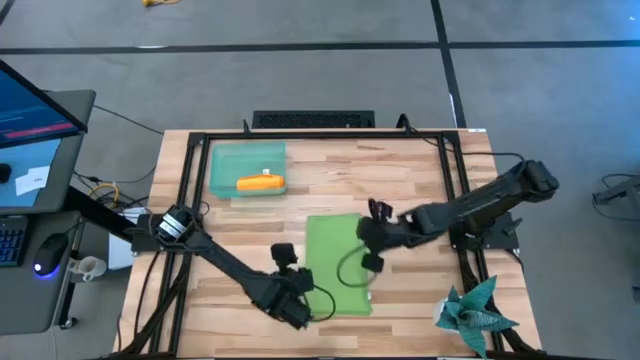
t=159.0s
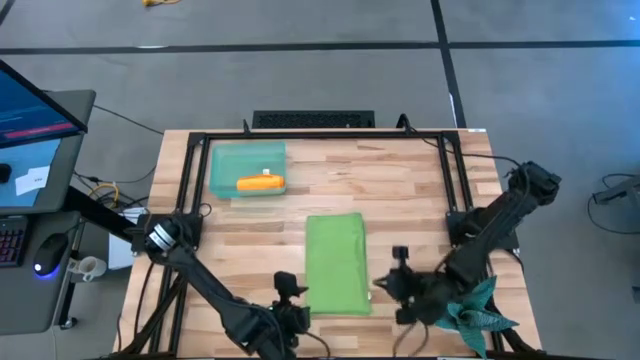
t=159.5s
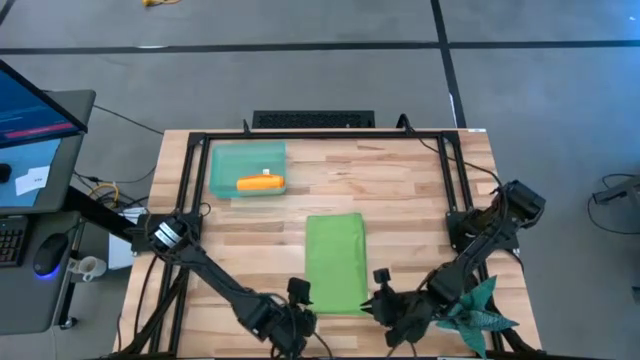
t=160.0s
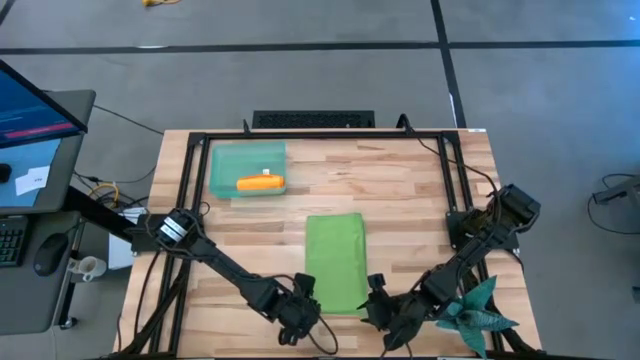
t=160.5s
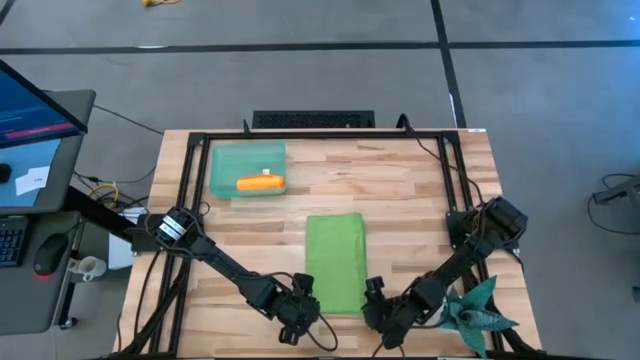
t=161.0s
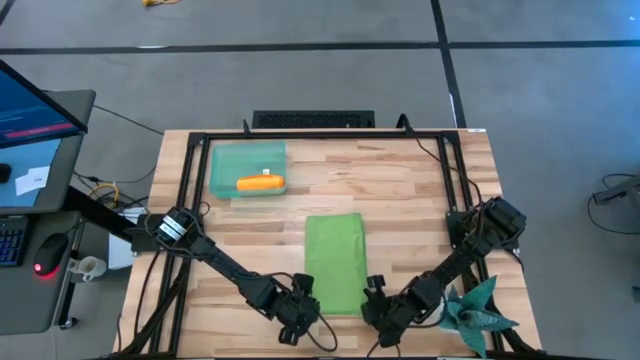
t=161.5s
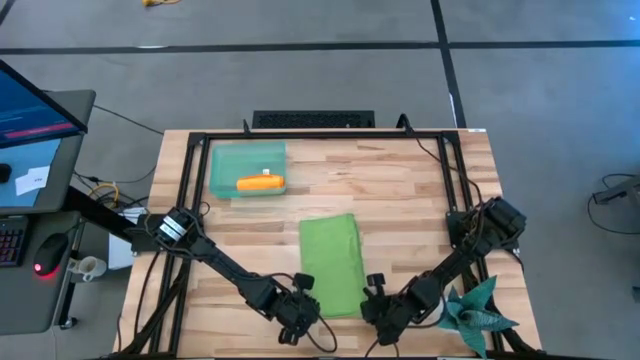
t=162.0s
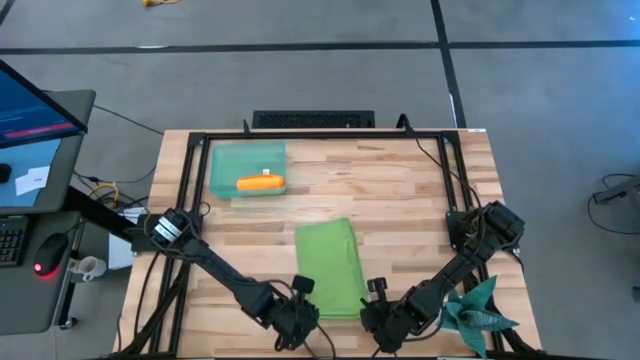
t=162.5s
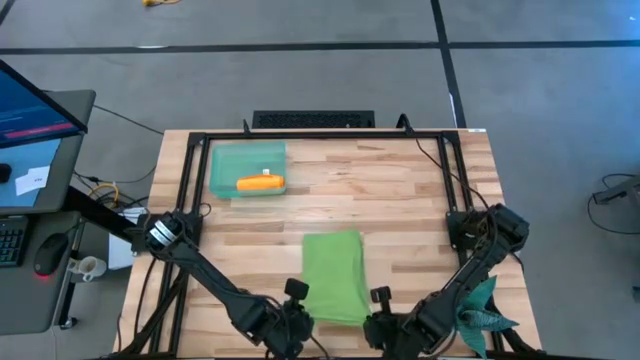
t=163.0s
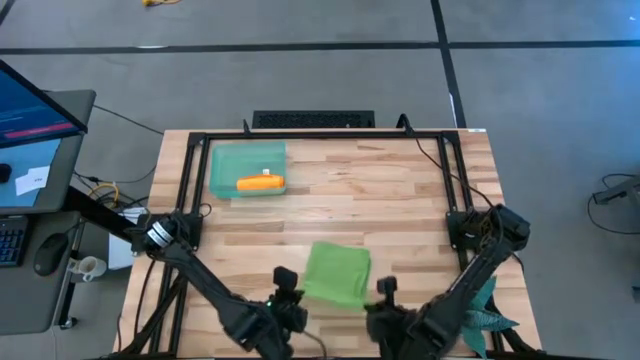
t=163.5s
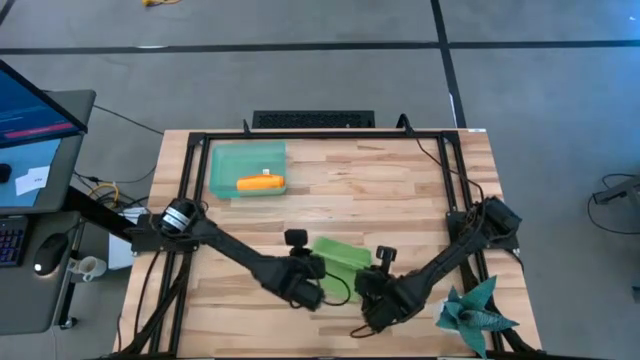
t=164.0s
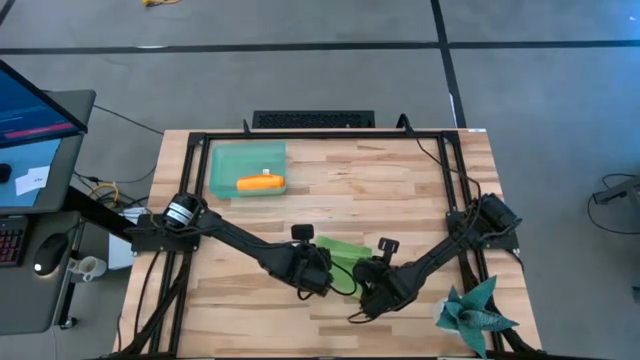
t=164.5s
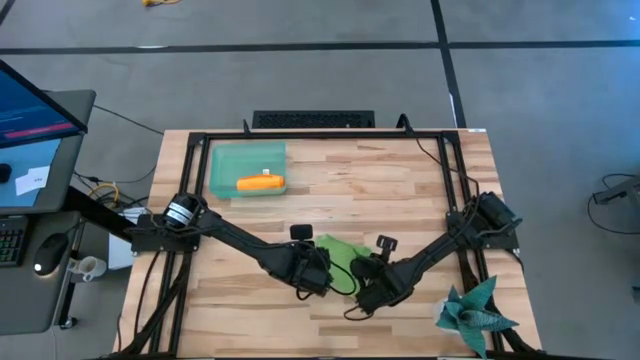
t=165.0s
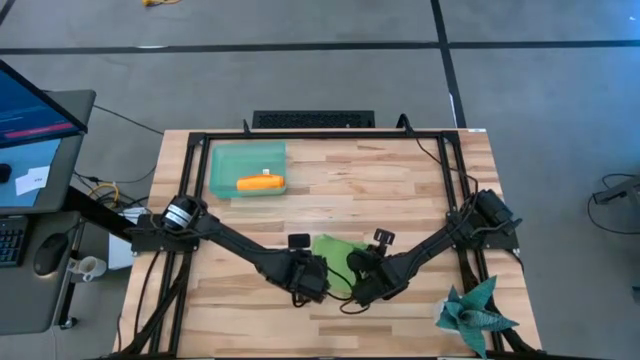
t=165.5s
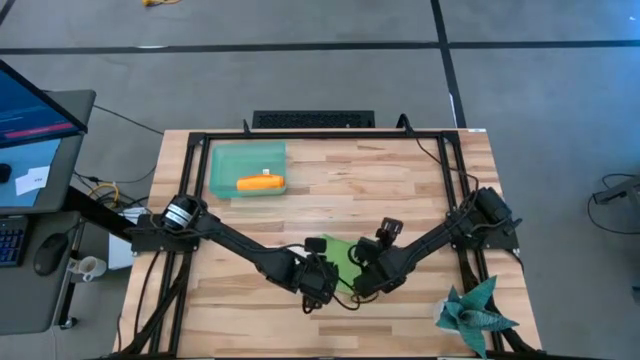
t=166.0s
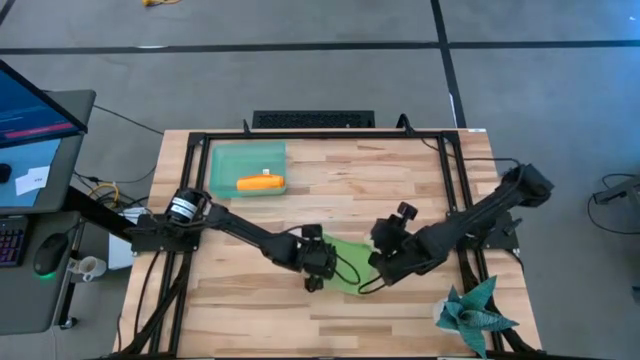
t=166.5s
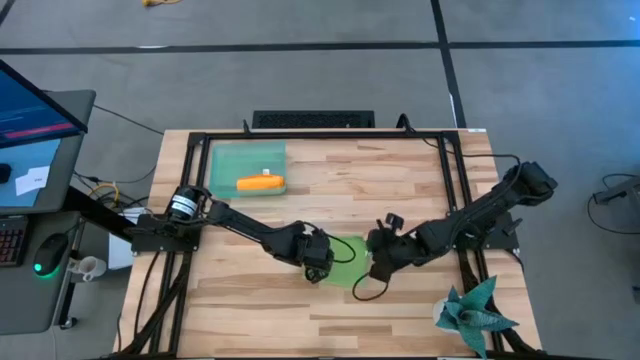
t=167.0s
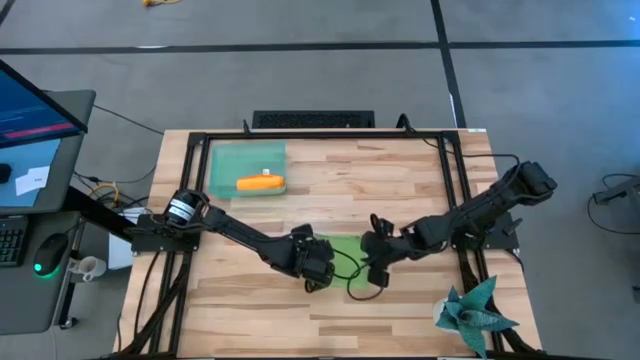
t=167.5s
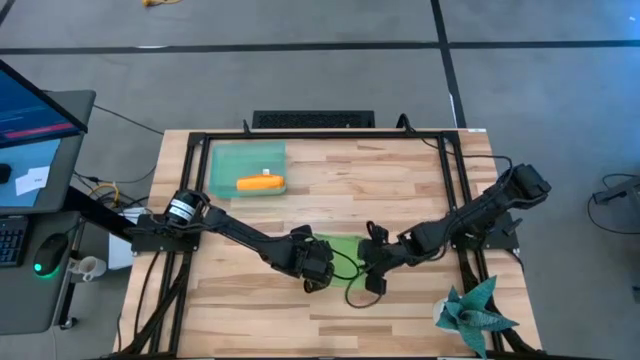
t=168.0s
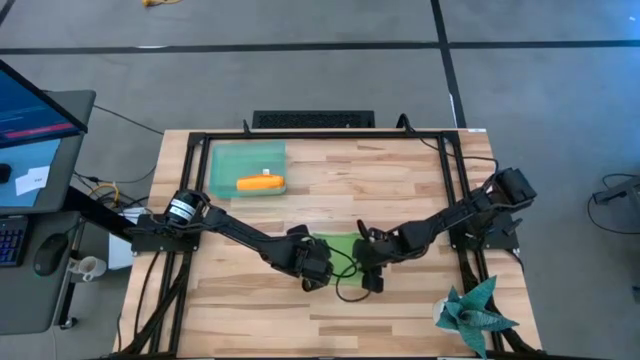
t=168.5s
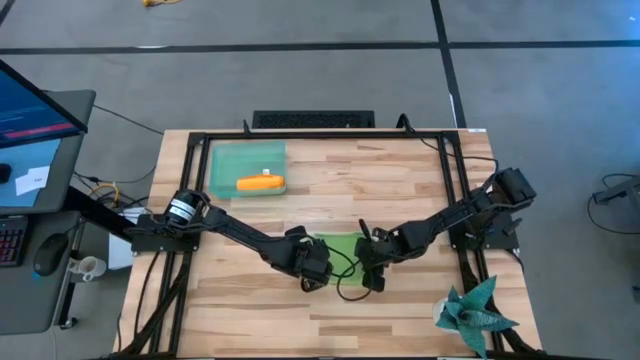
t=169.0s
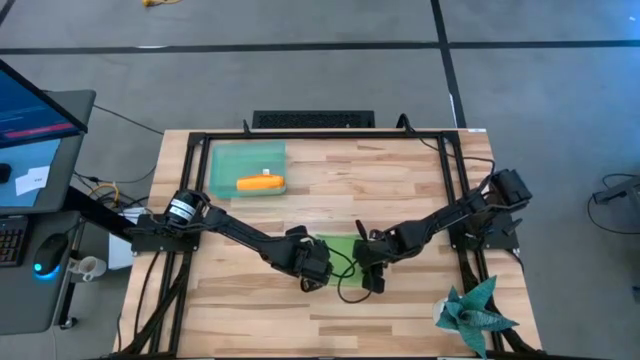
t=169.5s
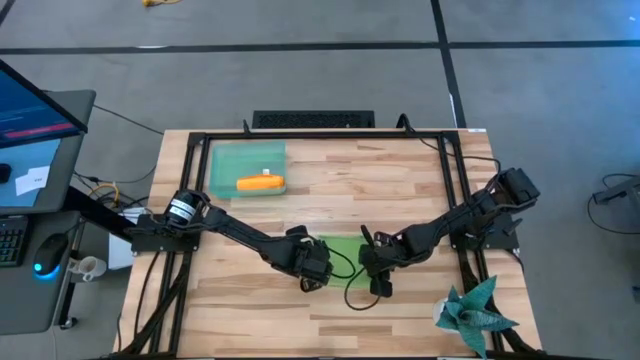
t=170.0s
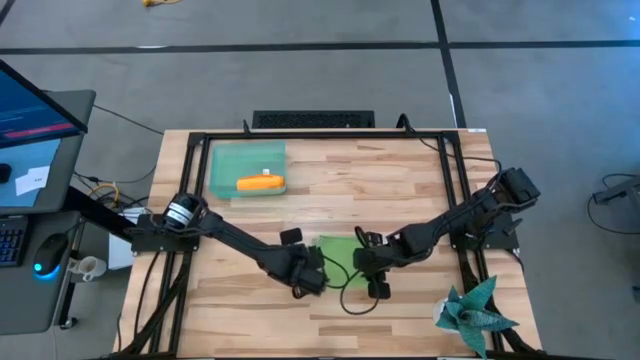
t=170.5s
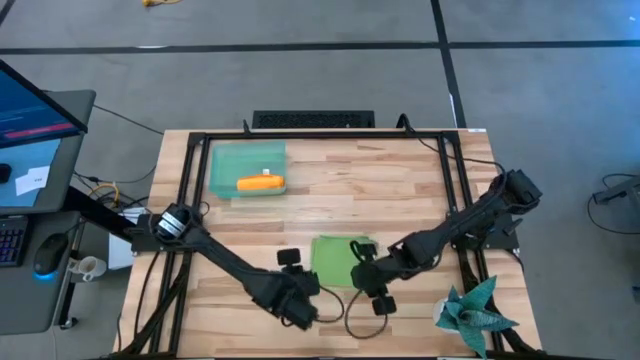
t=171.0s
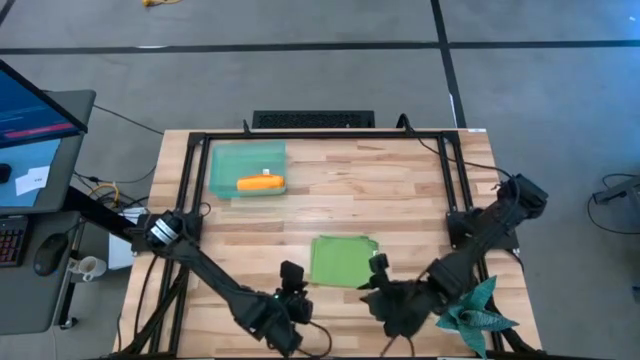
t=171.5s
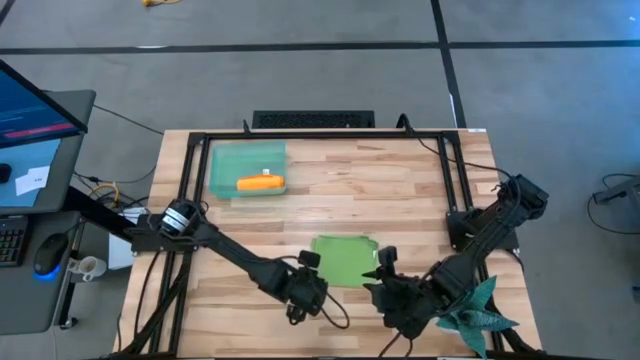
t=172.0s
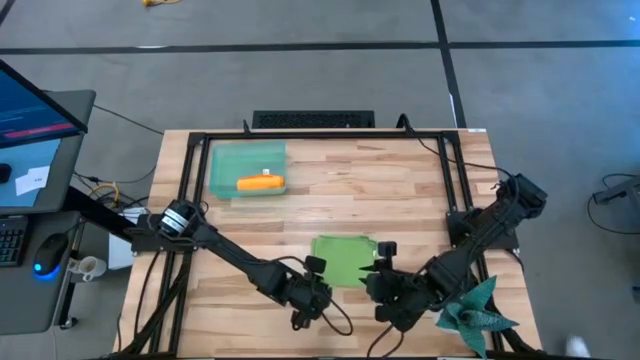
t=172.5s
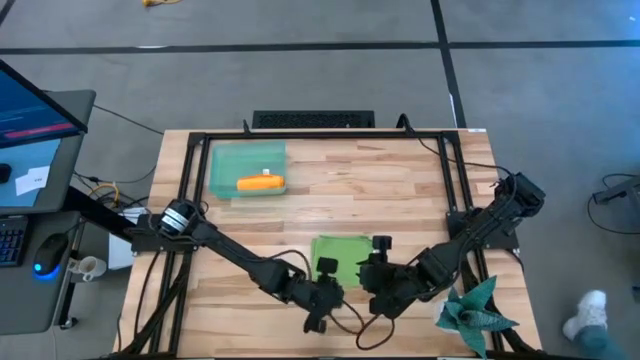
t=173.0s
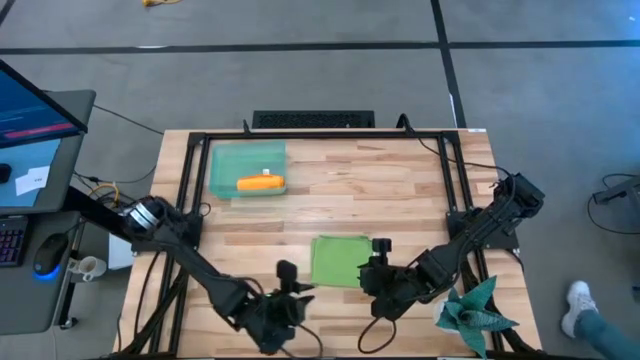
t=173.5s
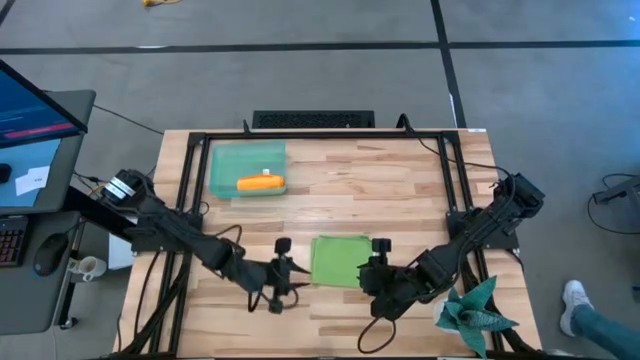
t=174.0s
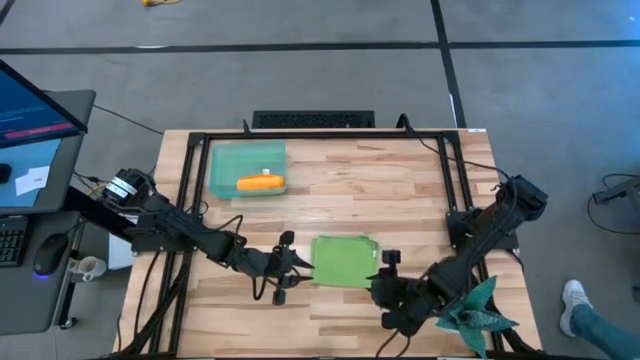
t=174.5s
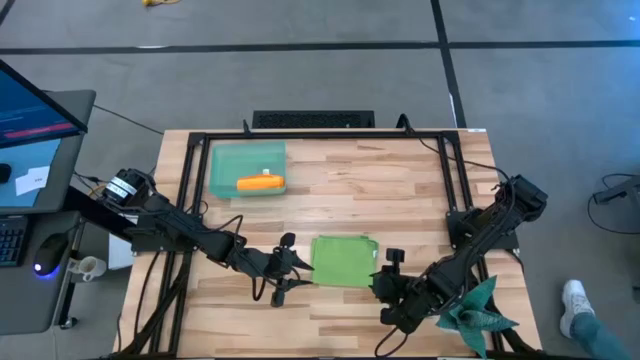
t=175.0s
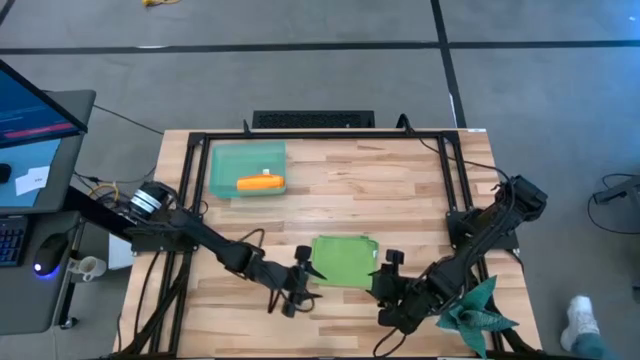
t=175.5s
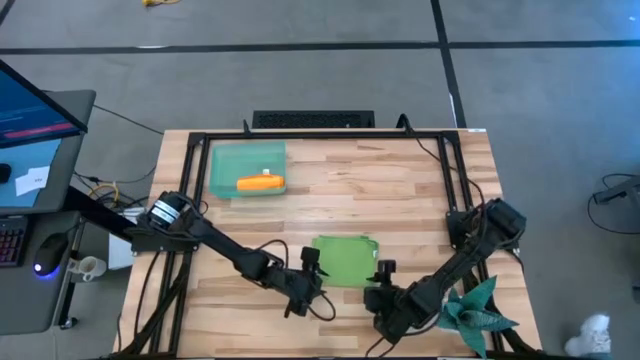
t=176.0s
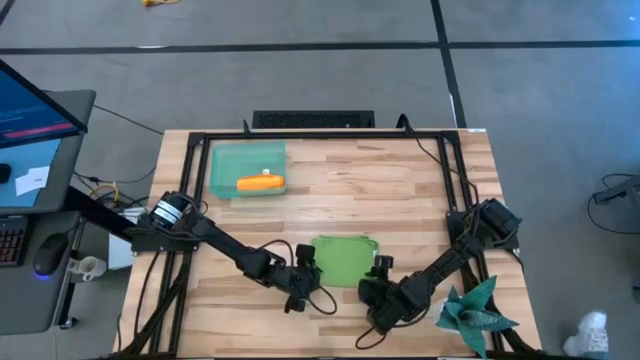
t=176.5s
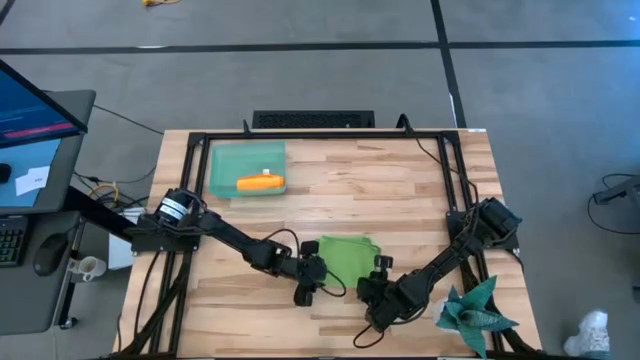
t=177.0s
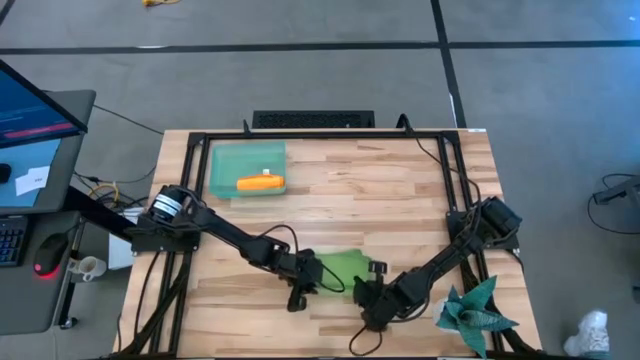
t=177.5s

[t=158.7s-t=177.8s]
Task: Roll microfiber towels into tight, uniform cylinder then place into a basket
Roll the green microfiber cloth

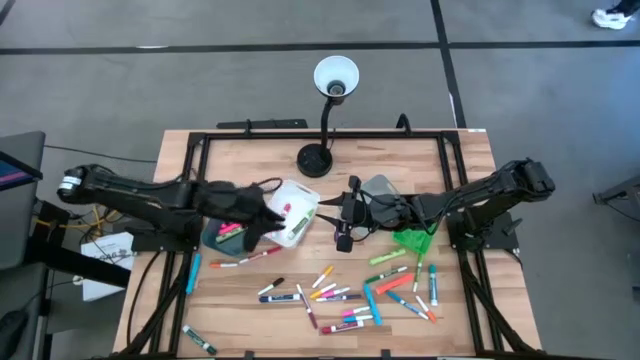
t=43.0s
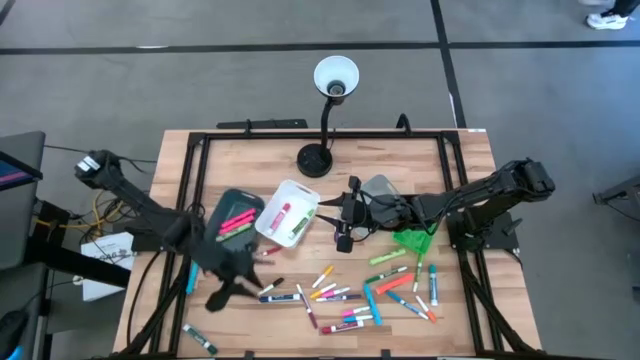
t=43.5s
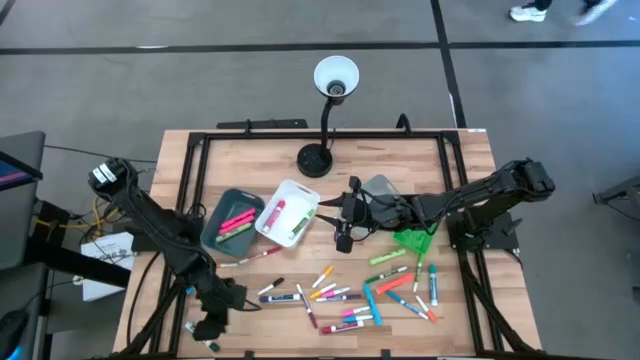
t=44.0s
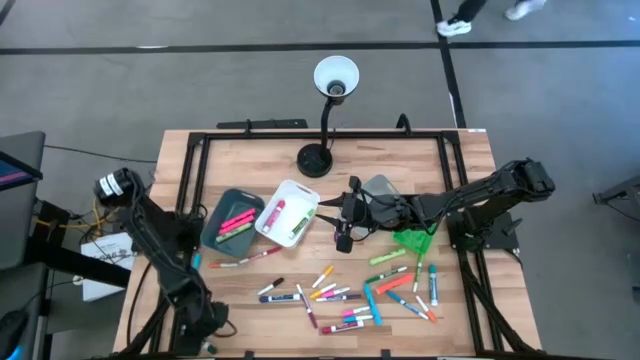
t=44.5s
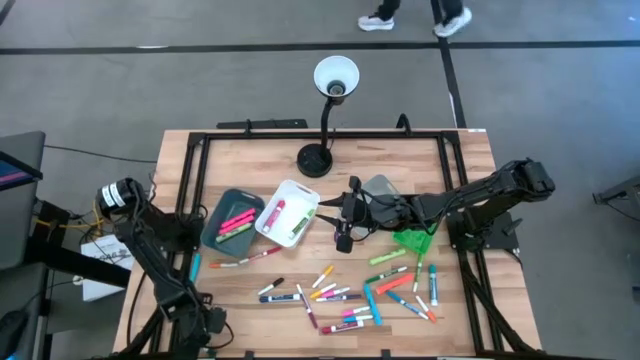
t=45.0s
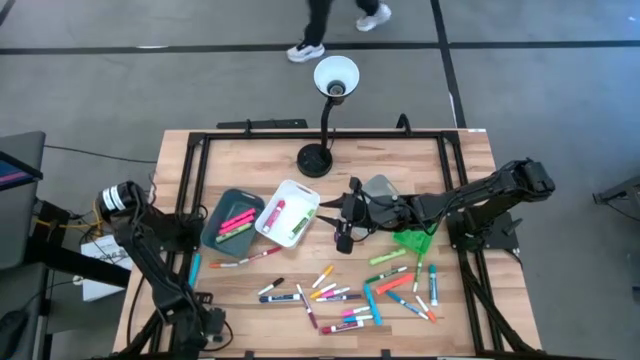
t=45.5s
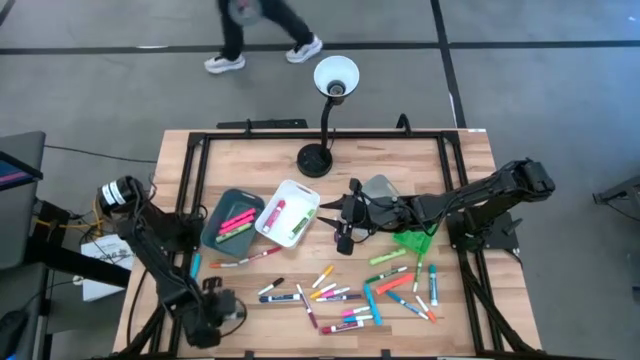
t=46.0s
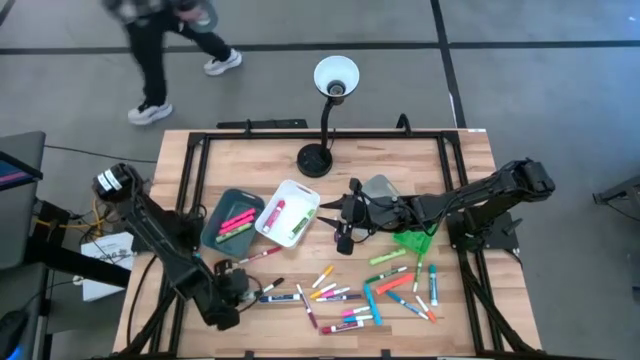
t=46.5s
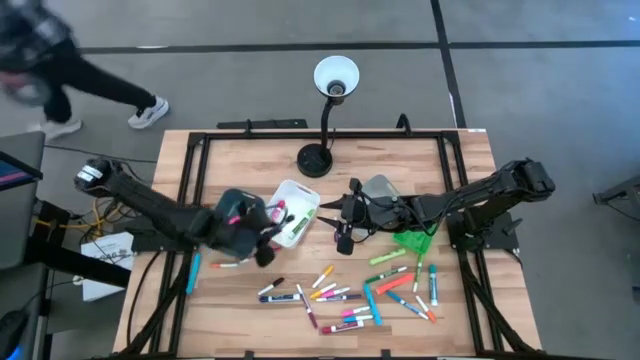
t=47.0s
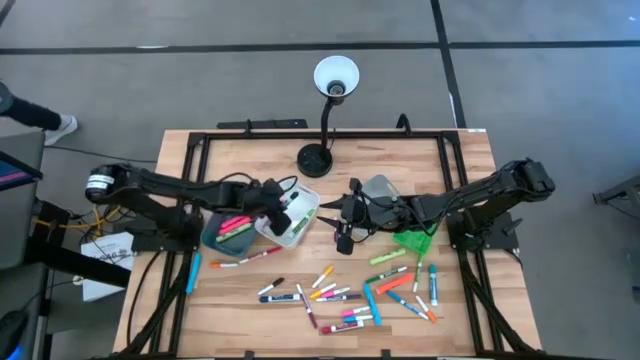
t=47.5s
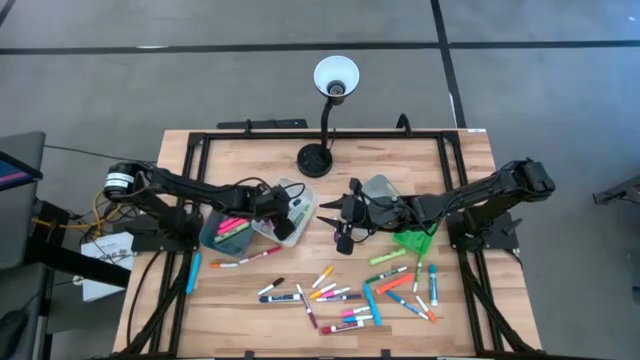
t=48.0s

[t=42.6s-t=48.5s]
Task: Pick & Place Markers
Put the dark green dry erase marker into the white bin
